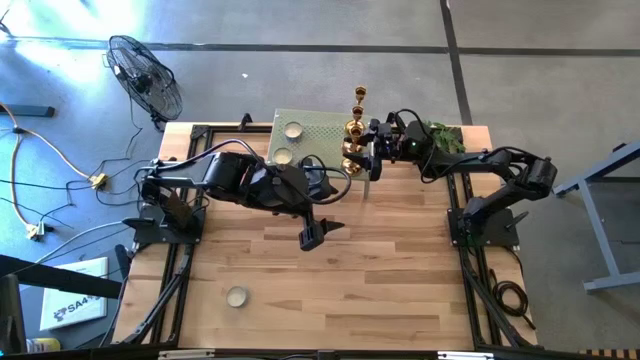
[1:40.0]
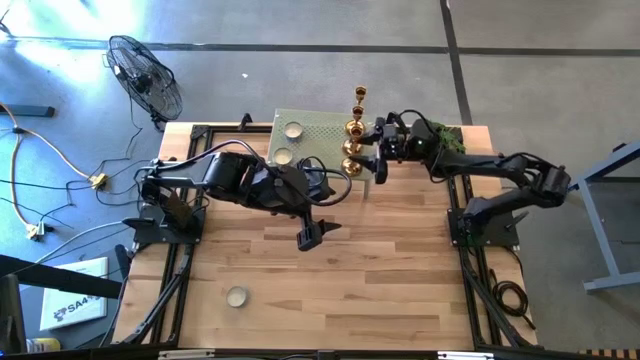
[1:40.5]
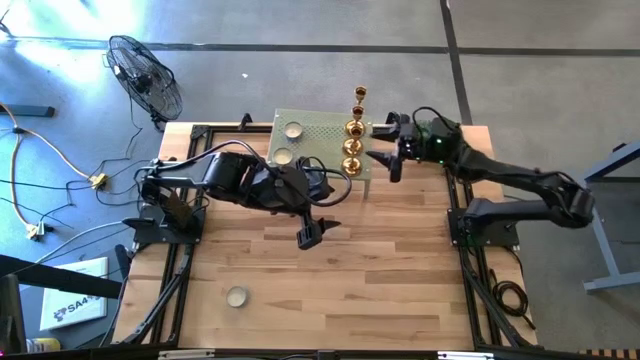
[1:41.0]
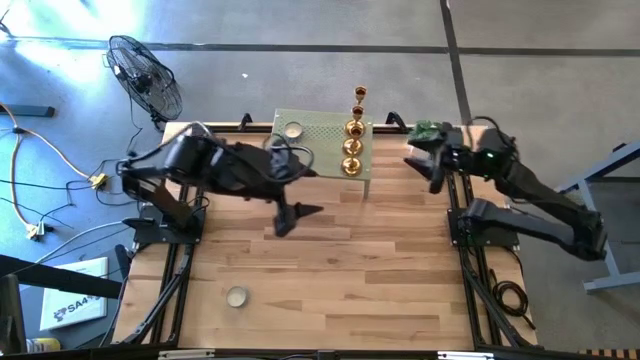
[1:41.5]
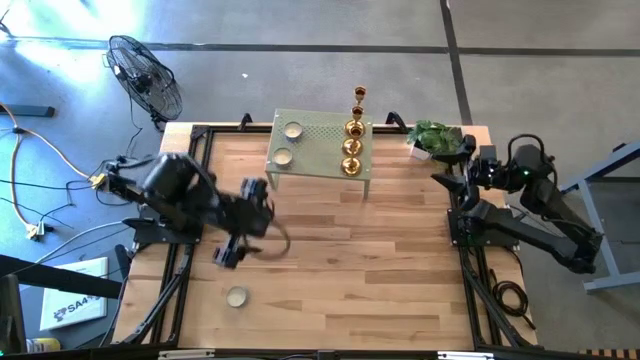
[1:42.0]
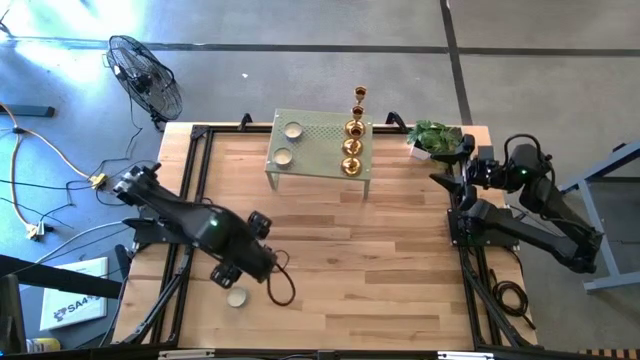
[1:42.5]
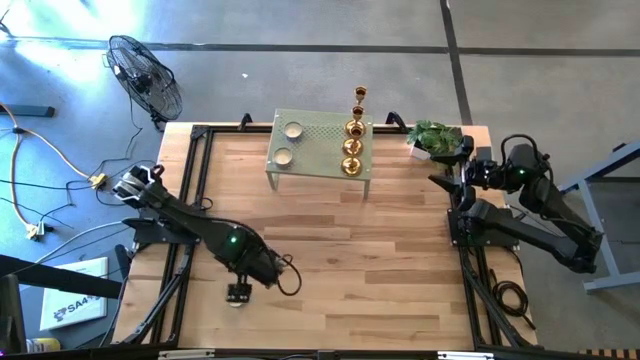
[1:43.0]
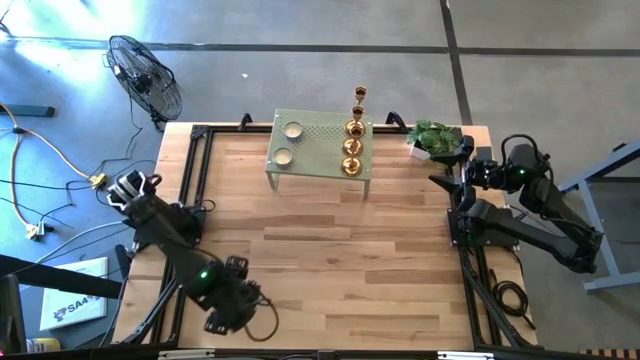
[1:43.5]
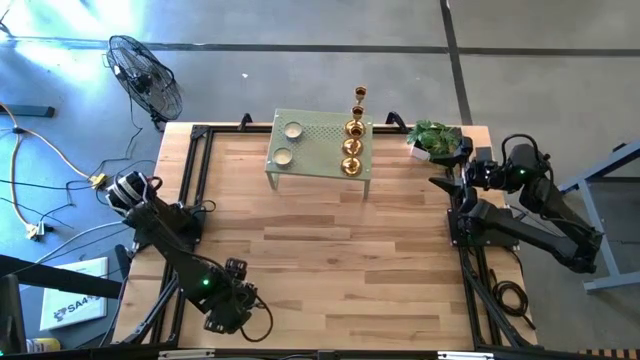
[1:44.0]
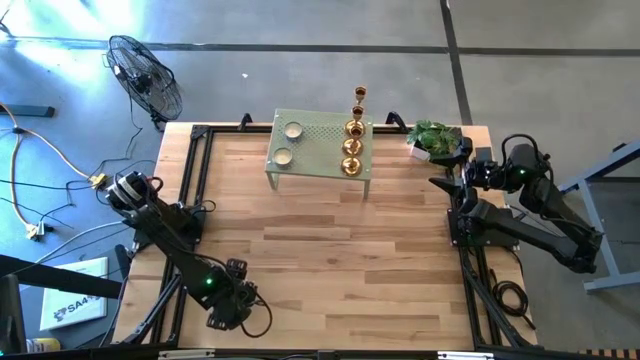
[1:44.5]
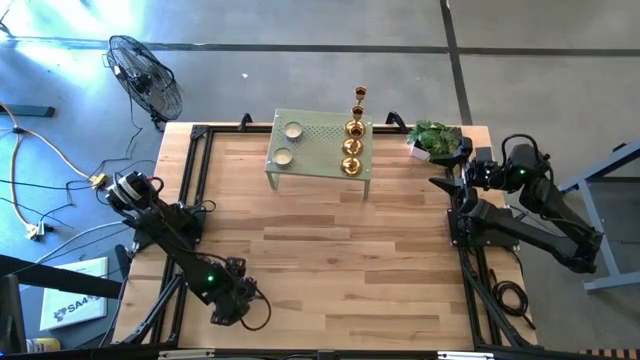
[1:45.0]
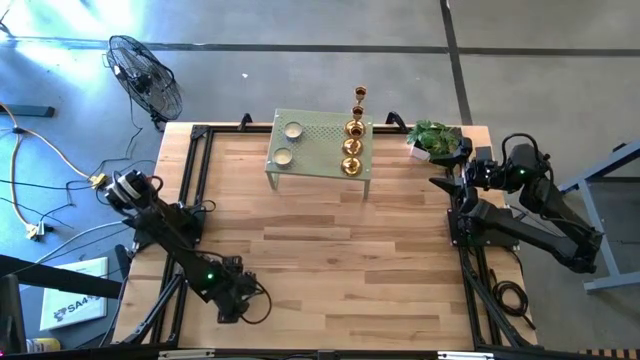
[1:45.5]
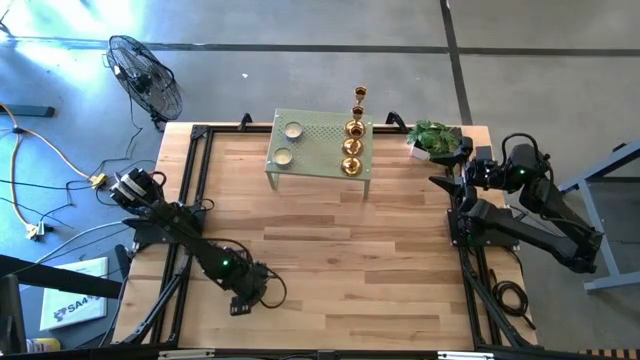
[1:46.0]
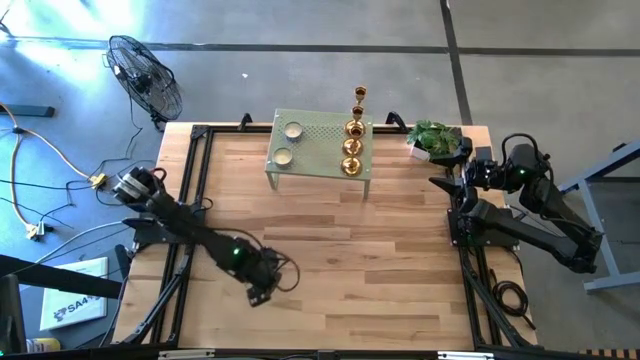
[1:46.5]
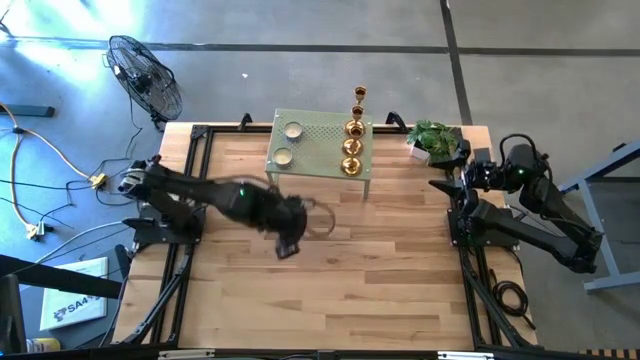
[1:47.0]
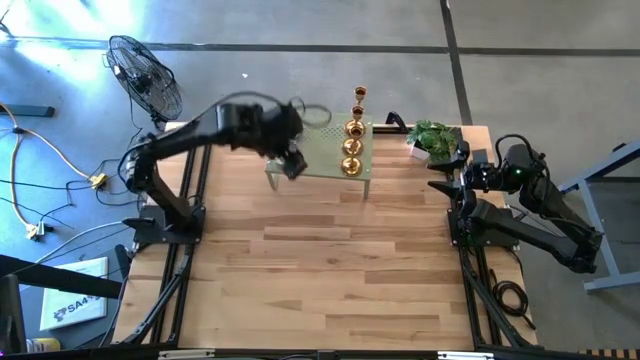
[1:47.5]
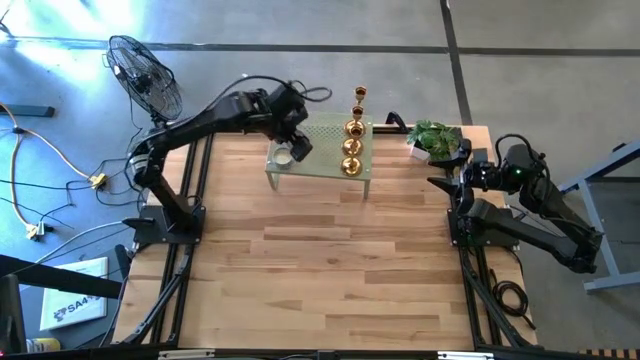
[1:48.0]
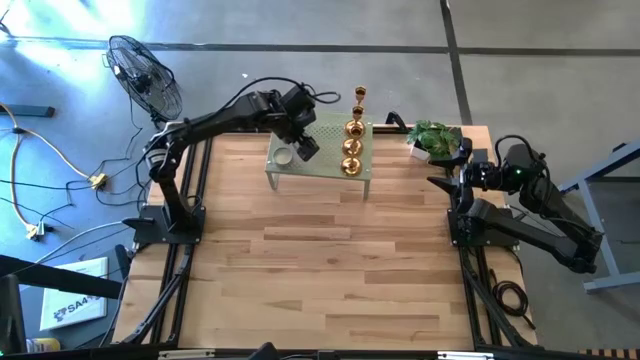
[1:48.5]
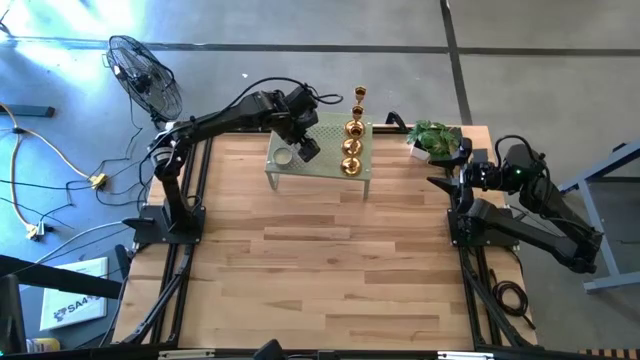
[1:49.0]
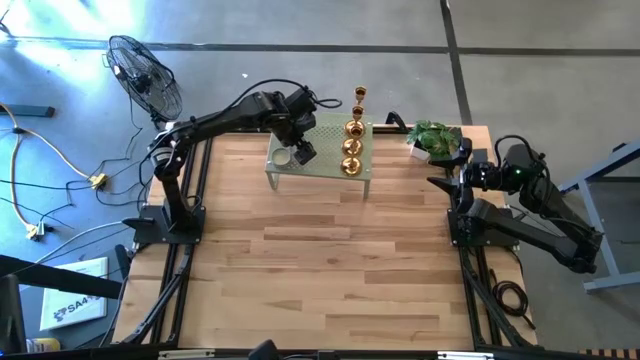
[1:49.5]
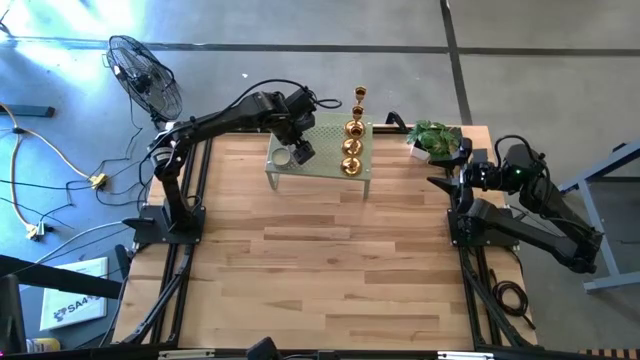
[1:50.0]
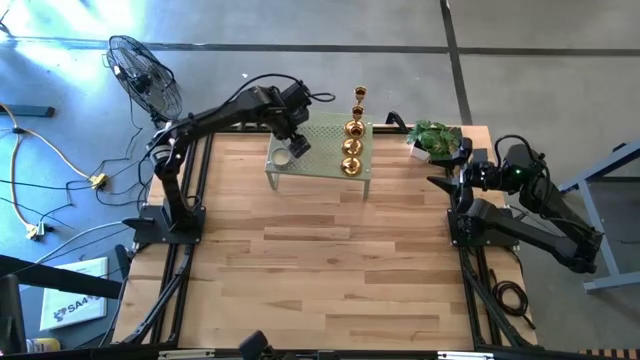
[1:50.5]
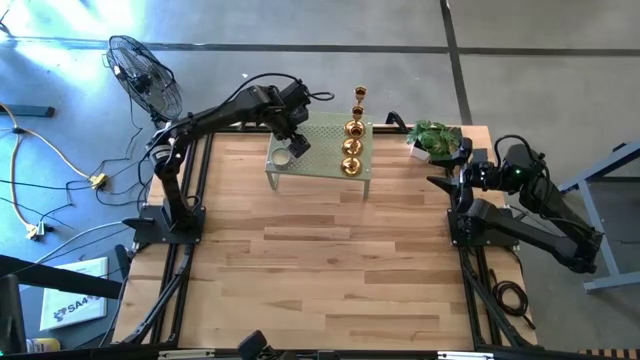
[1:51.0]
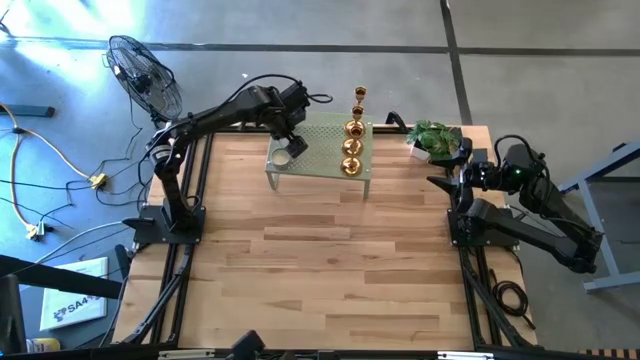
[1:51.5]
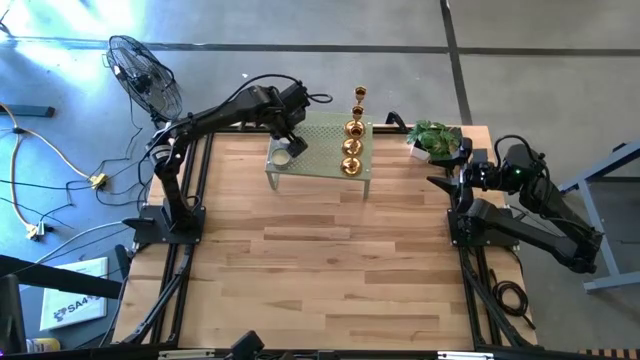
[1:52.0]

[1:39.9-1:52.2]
Task: Stock candles and holders on shelf
Align the light blue scented candle with the other scented candles on the shelf

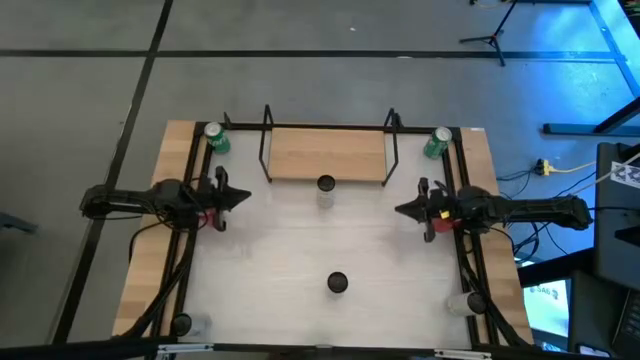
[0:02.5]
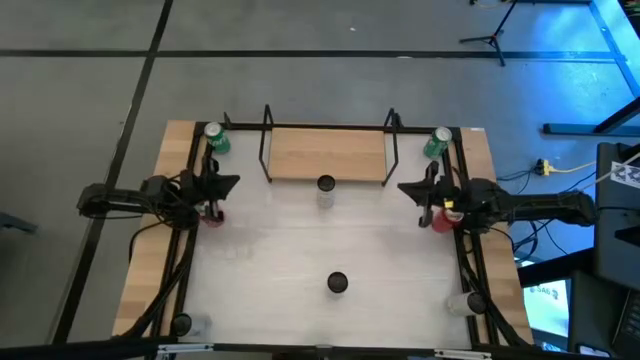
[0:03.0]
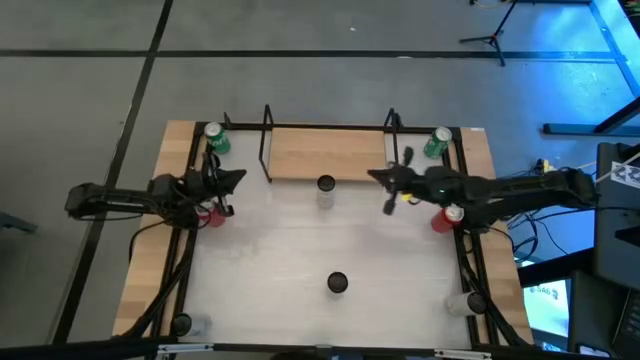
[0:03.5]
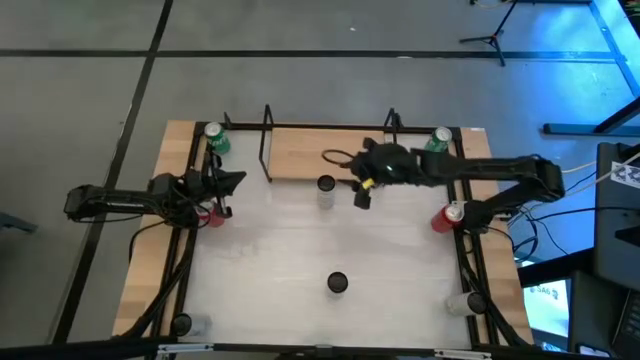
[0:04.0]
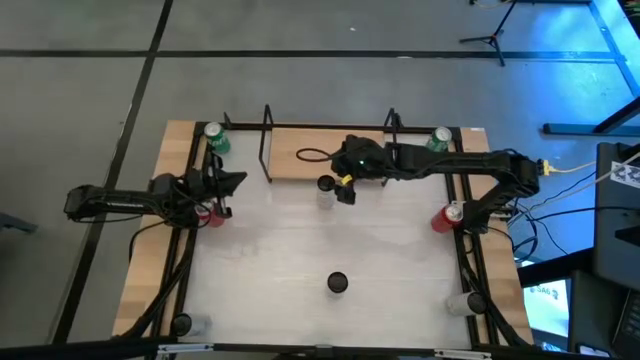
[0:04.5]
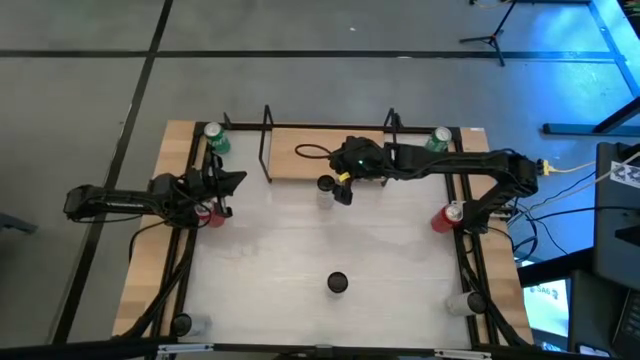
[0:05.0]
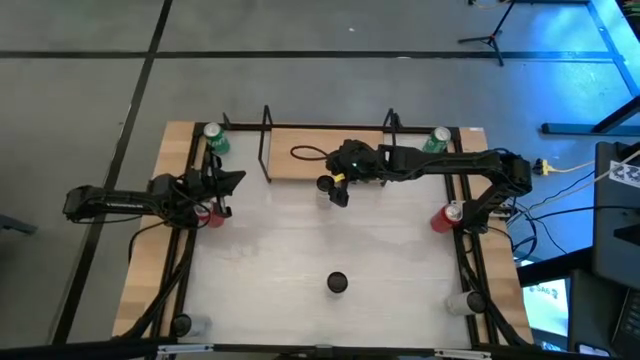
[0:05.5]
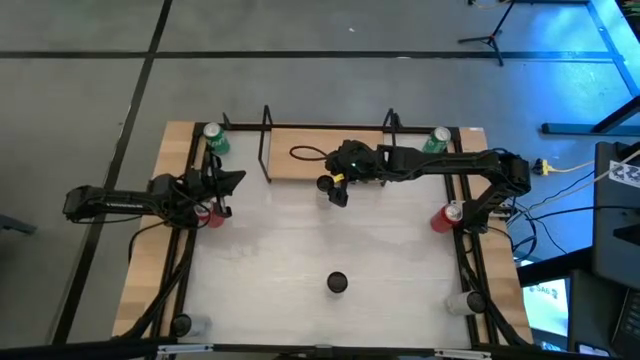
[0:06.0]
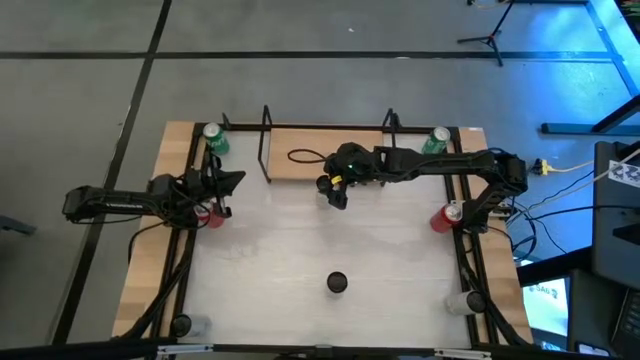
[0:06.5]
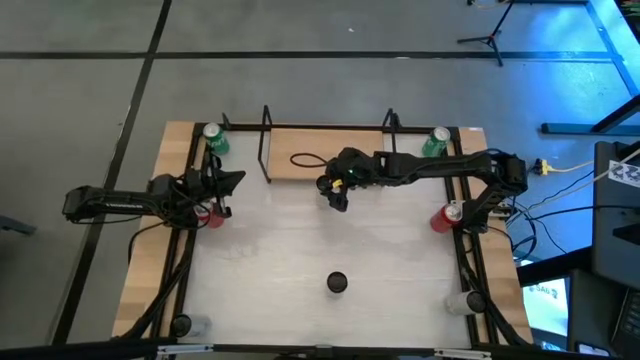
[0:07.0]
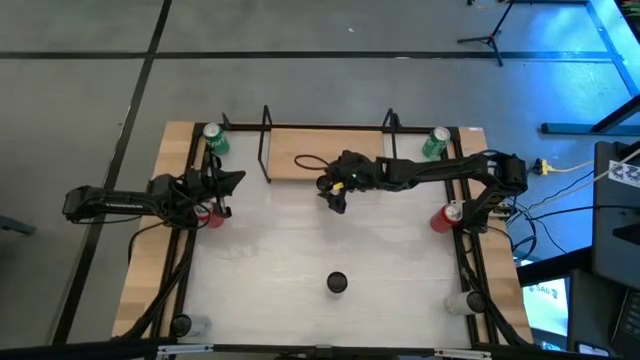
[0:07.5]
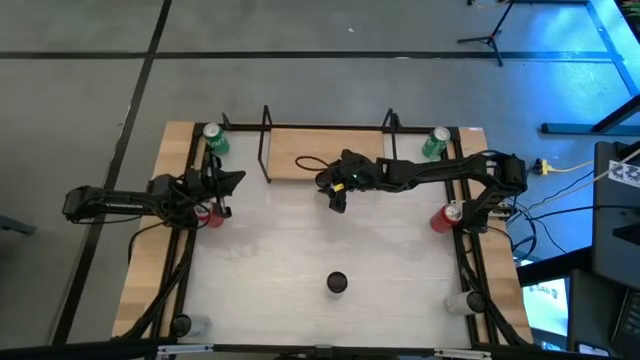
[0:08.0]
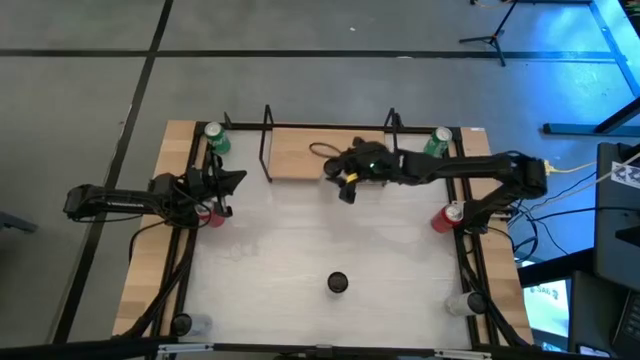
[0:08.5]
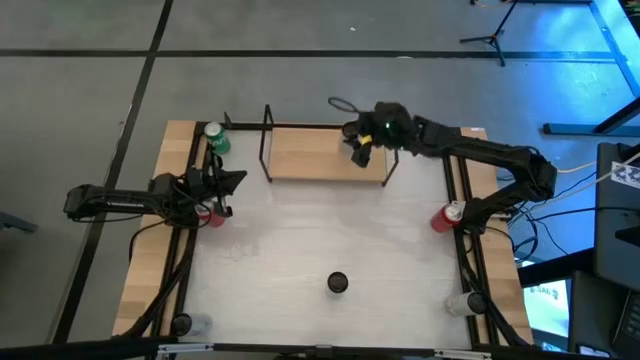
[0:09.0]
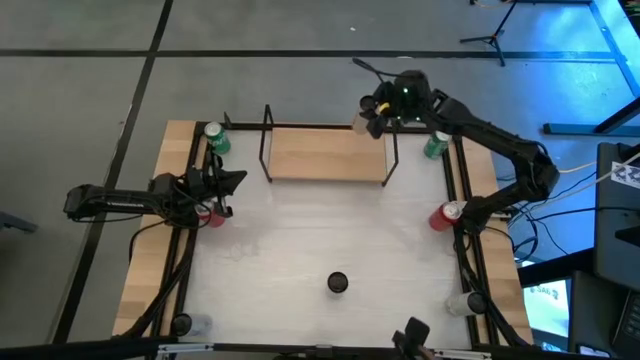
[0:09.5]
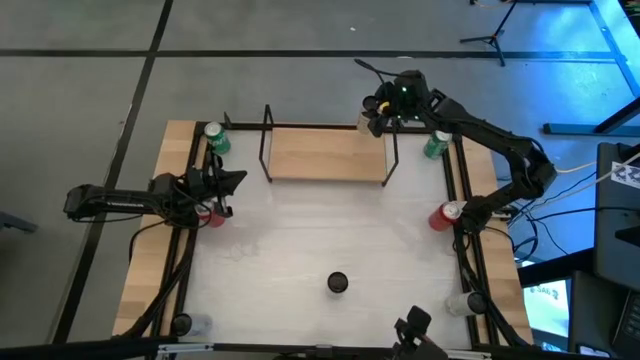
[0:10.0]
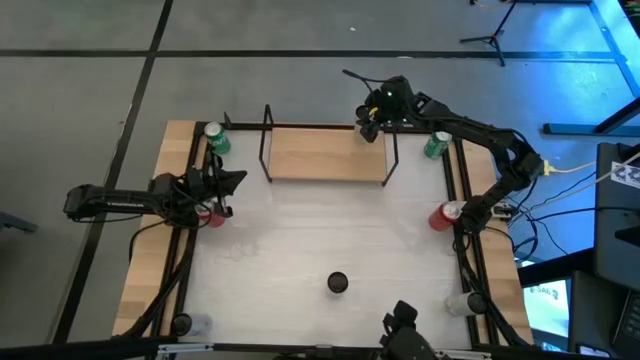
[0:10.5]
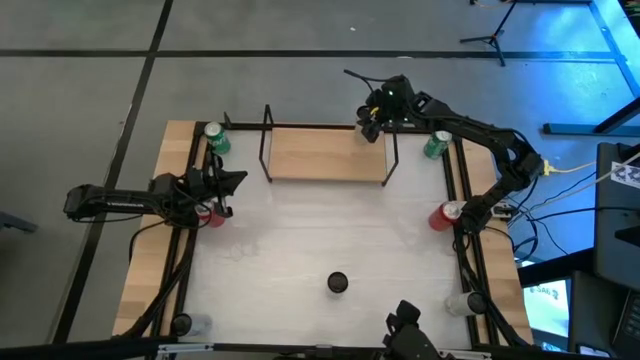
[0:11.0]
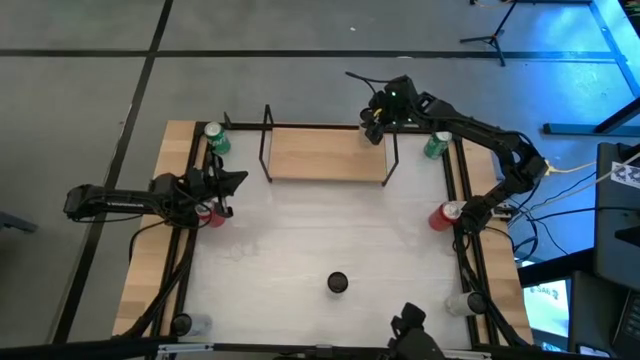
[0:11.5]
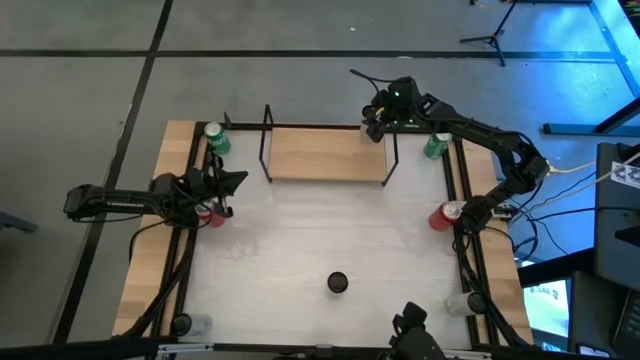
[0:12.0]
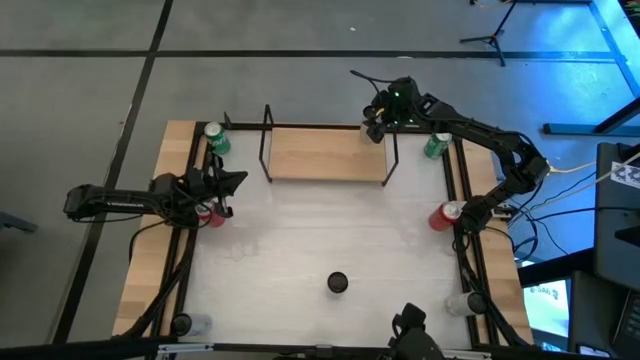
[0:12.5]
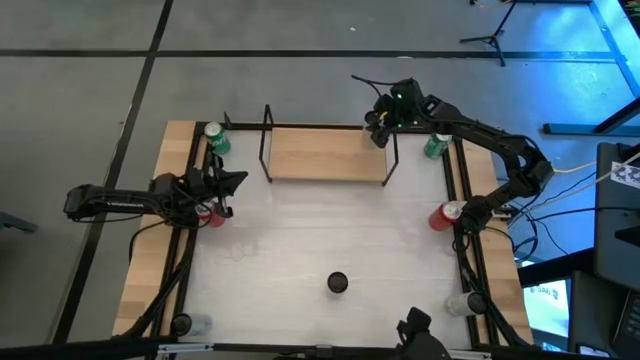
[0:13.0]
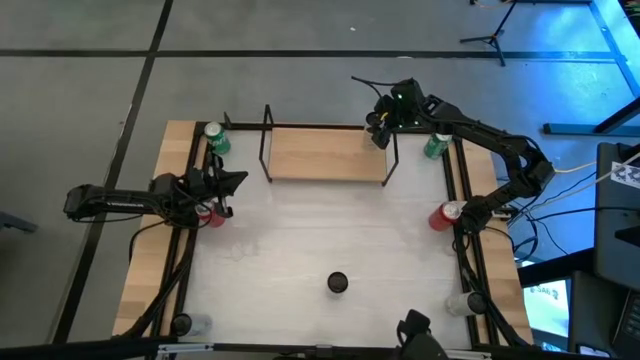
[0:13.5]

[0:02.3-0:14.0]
Task: Place canned beverage on shelf
Put the top white and yellow soda can on the shelf
